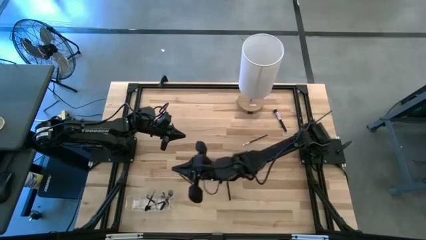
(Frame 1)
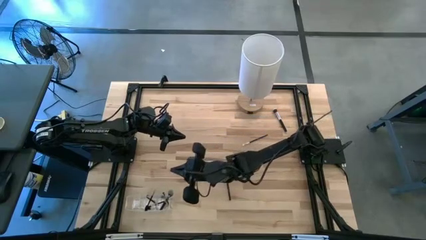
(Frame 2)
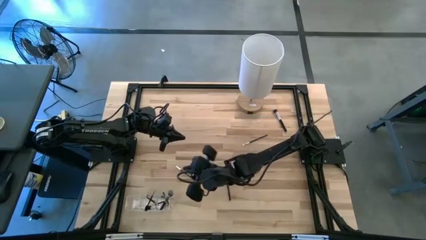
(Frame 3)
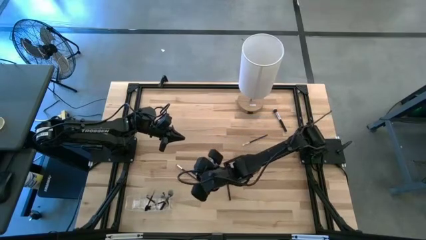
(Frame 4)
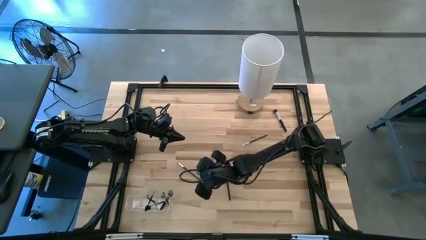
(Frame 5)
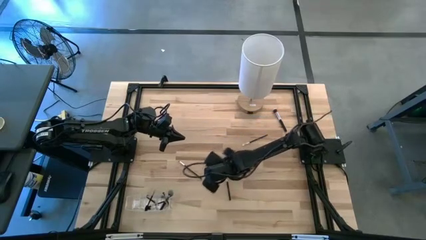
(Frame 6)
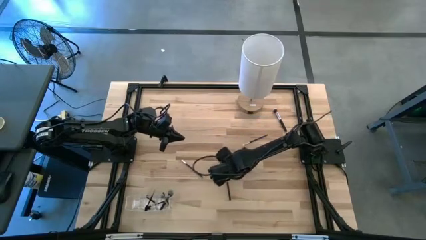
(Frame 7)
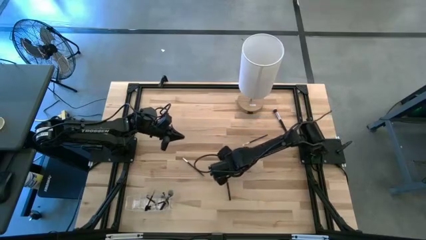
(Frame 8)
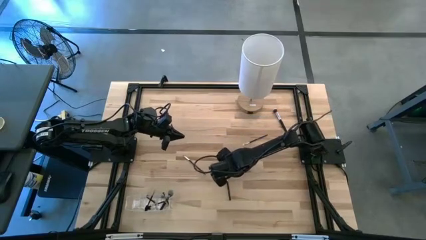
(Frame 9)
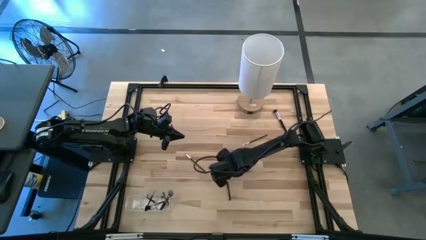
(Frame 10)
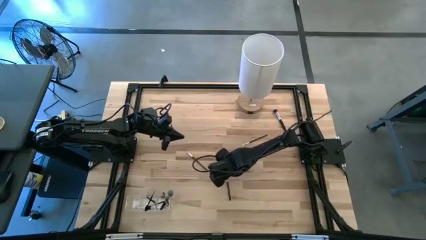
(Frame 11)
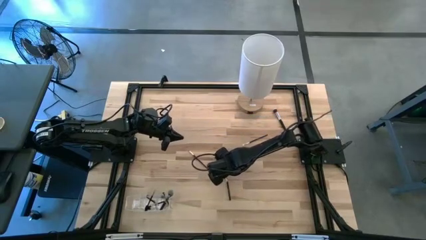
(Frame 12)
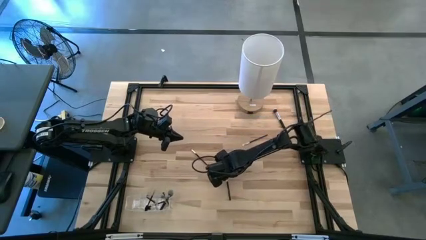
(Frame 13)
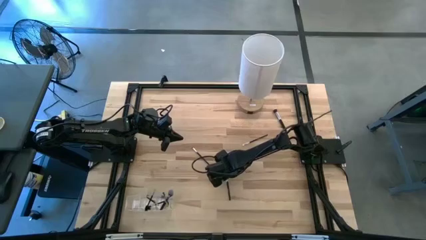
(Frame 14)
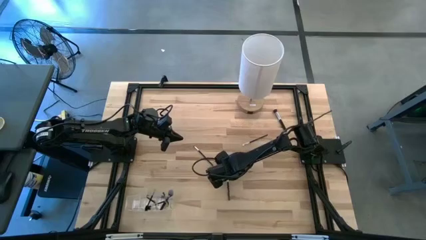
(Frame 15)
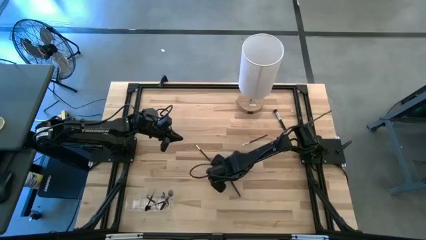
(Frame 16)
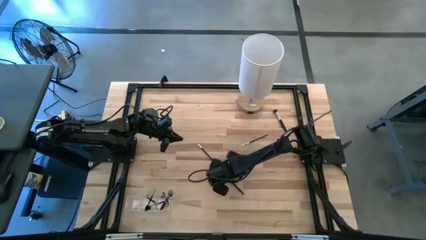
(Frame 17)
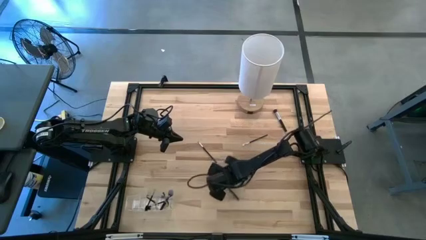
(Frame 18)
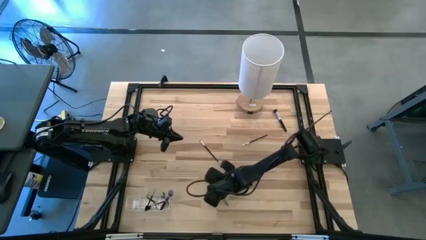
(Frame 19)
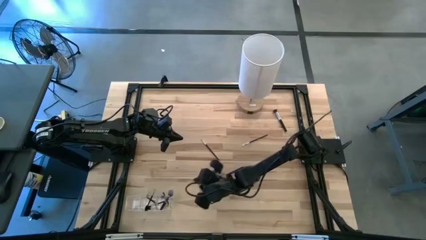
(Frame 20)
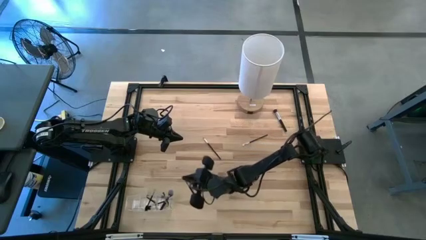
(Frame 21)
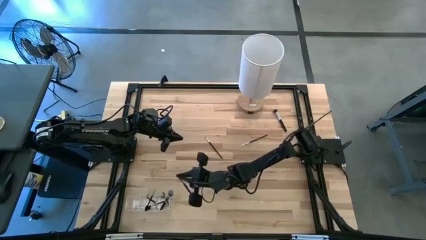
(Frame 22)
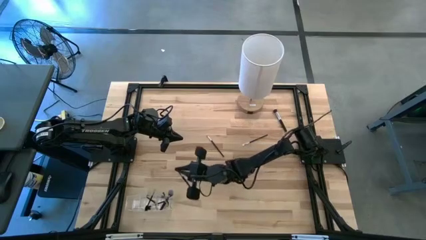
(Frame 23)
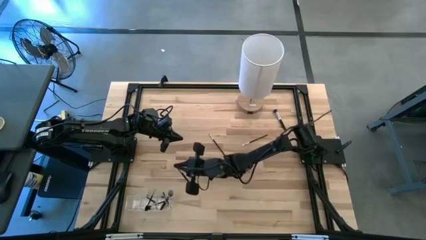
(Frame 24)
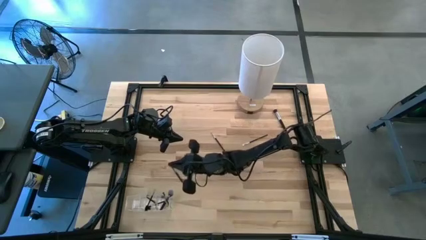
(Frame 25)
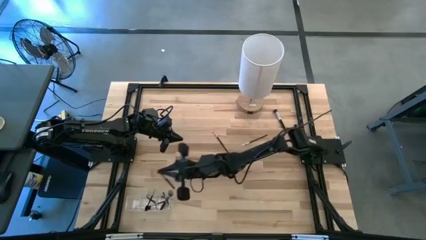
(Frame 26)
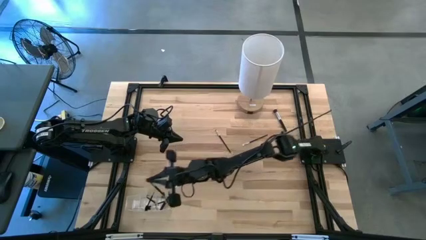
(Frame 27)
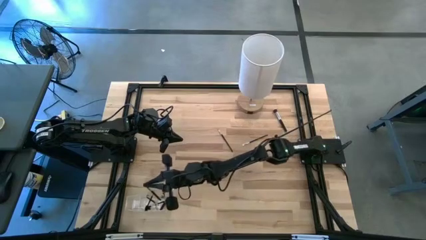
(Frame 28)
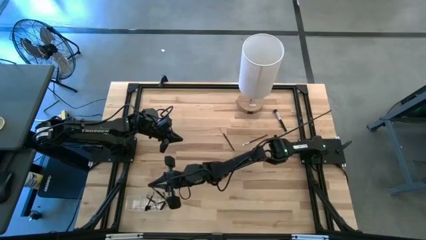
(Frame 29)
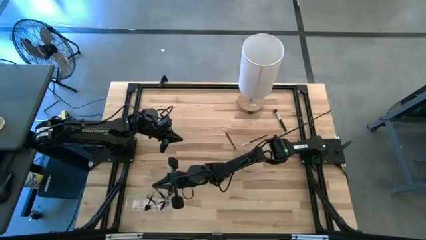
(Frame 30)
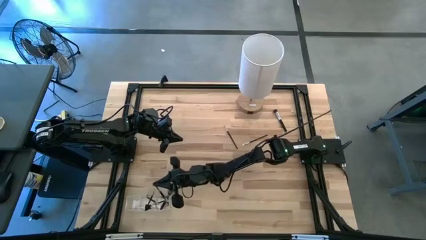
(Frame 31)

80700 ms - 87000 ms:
Task: Put items in baskets/containers
Put the eyeshadow brush into the transparent organizer

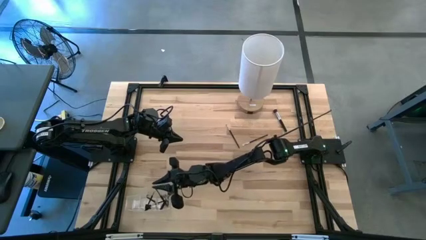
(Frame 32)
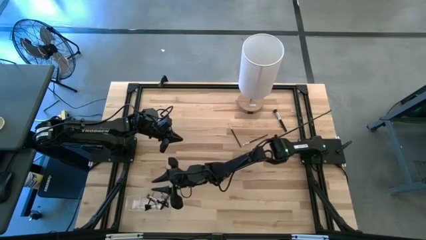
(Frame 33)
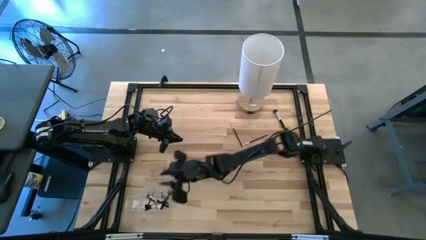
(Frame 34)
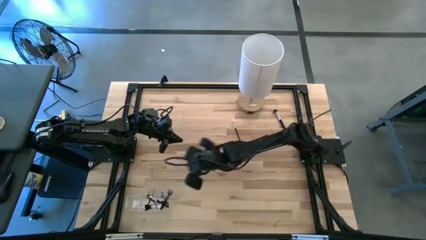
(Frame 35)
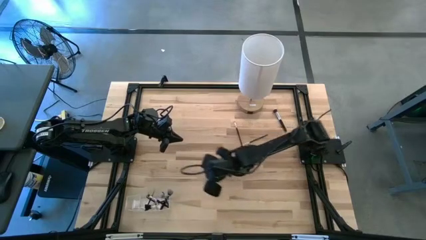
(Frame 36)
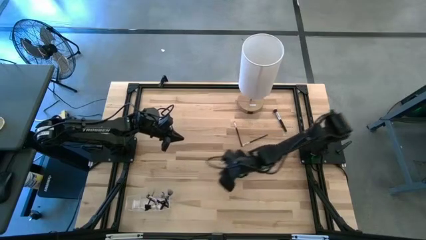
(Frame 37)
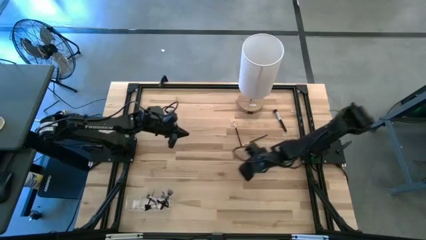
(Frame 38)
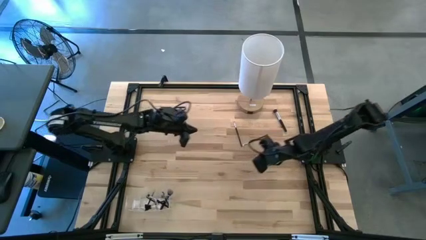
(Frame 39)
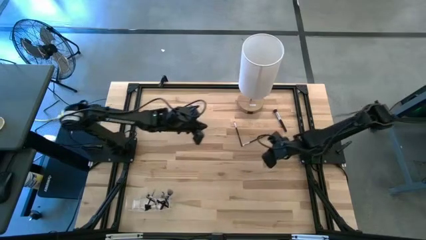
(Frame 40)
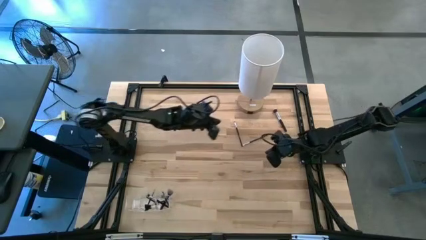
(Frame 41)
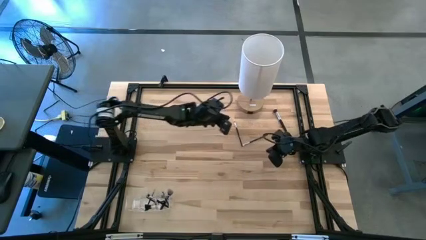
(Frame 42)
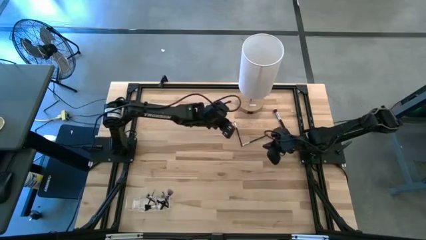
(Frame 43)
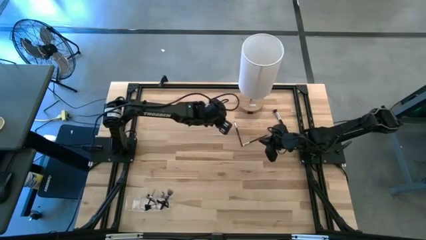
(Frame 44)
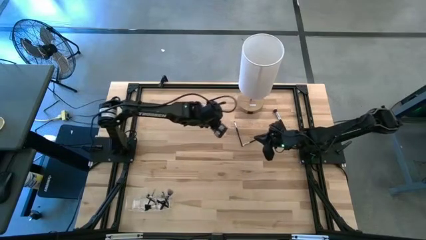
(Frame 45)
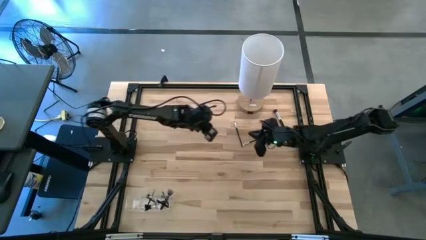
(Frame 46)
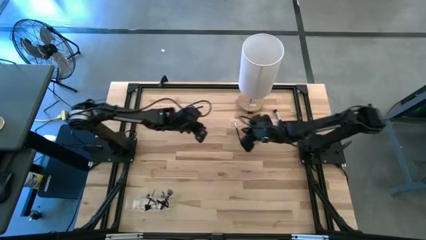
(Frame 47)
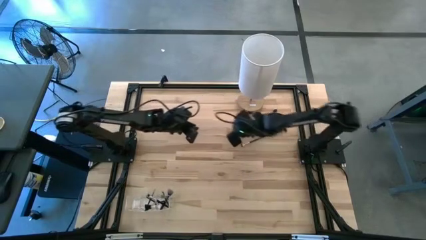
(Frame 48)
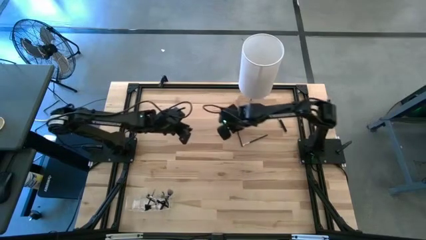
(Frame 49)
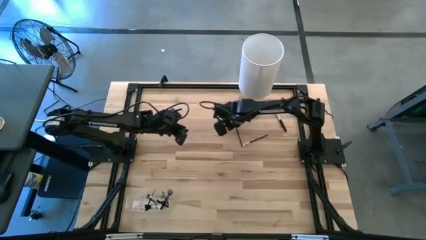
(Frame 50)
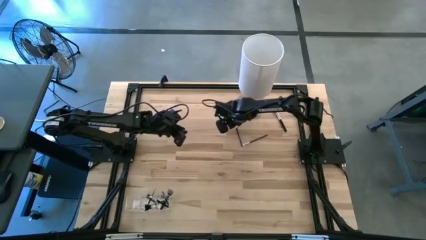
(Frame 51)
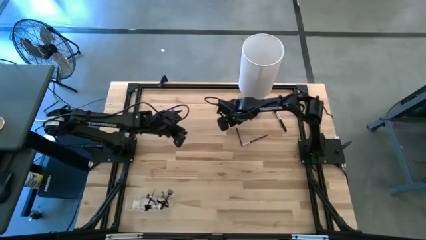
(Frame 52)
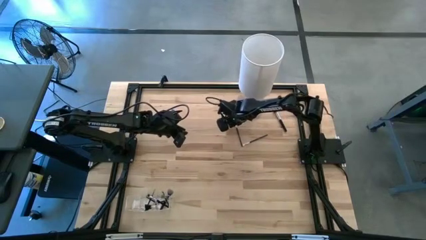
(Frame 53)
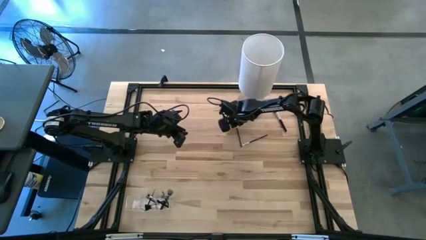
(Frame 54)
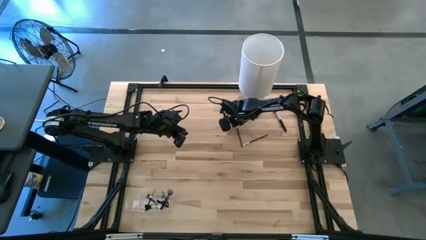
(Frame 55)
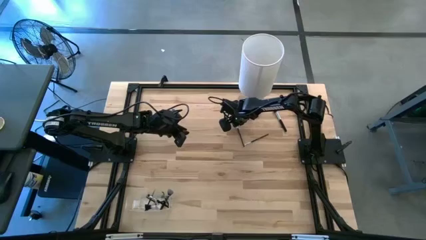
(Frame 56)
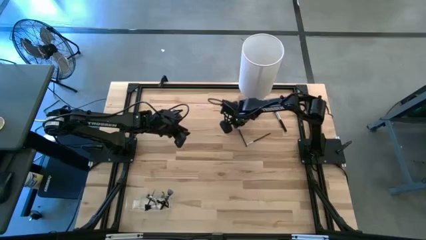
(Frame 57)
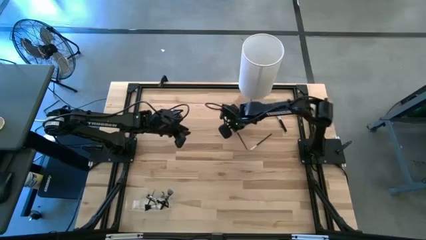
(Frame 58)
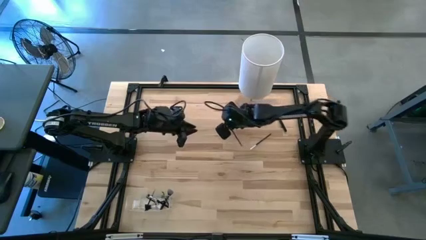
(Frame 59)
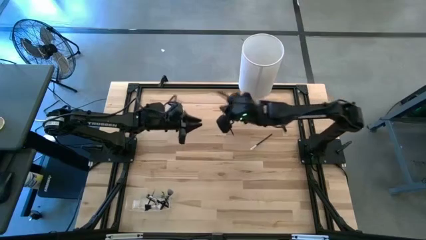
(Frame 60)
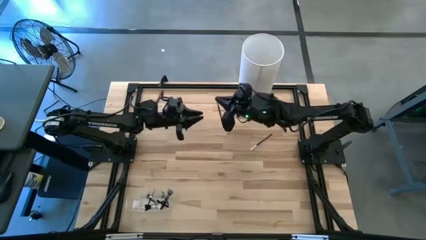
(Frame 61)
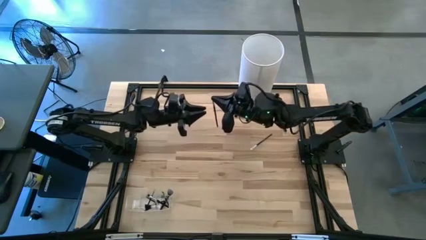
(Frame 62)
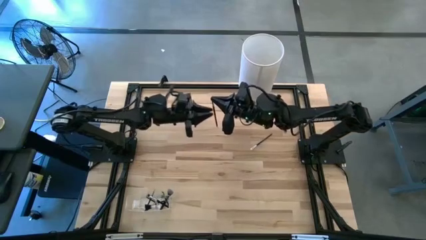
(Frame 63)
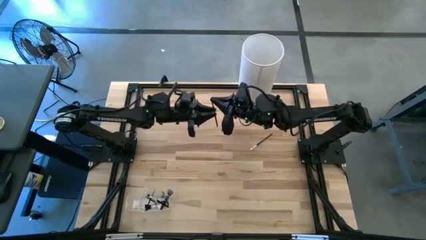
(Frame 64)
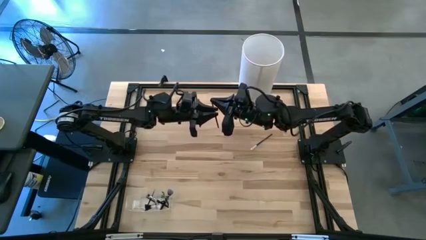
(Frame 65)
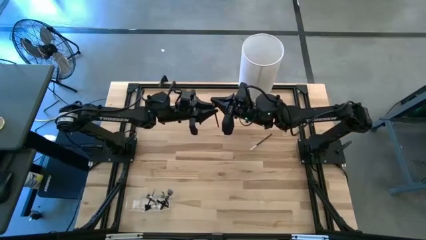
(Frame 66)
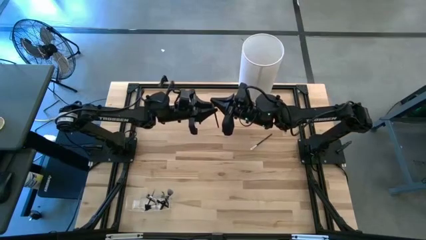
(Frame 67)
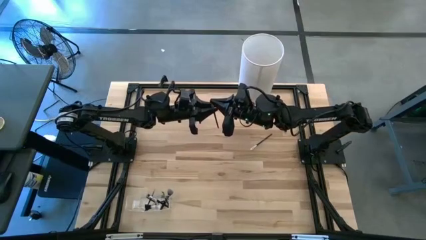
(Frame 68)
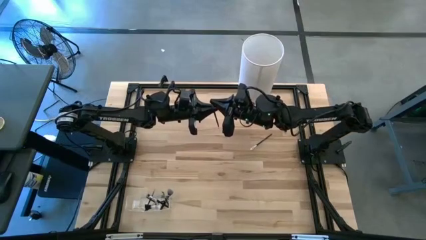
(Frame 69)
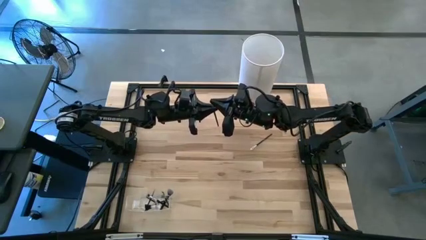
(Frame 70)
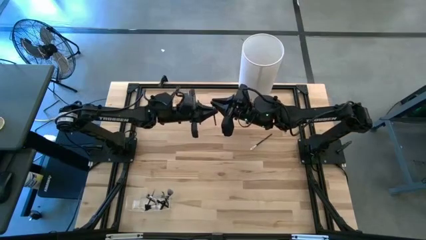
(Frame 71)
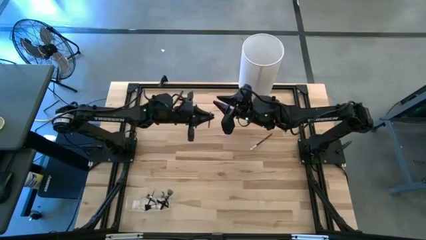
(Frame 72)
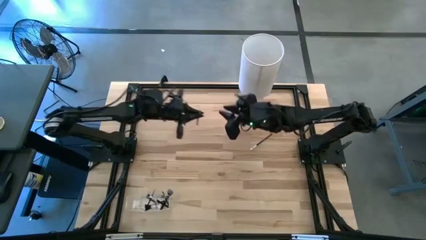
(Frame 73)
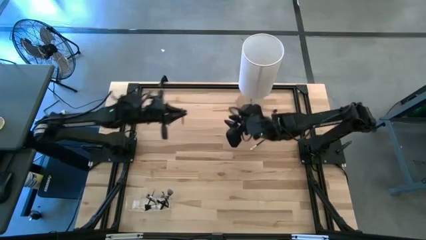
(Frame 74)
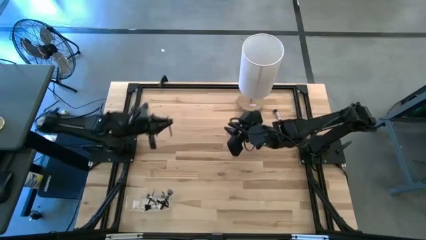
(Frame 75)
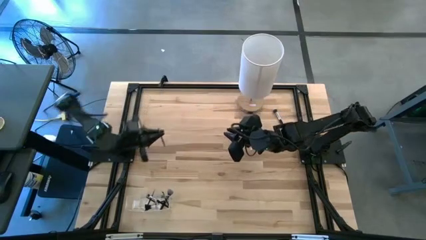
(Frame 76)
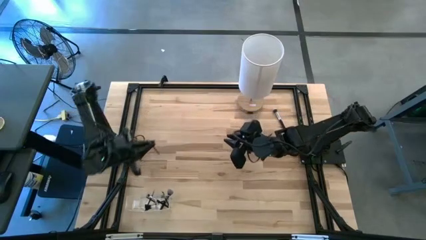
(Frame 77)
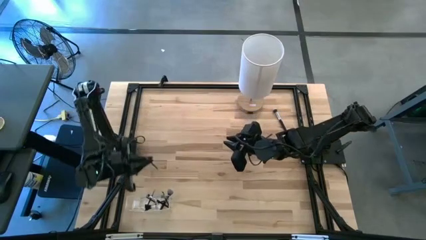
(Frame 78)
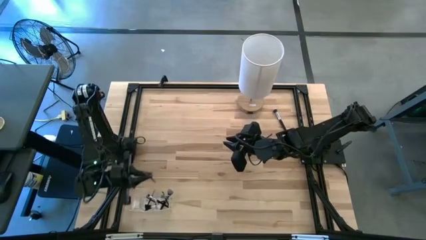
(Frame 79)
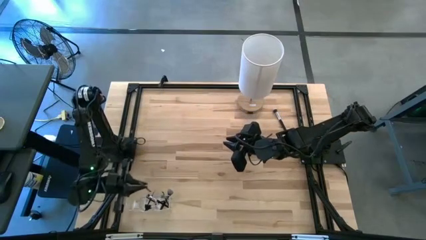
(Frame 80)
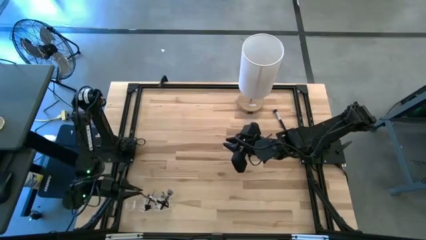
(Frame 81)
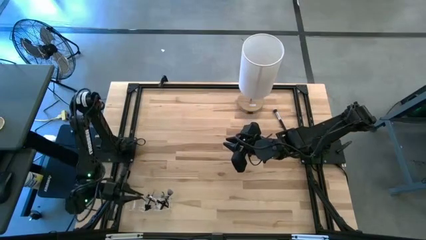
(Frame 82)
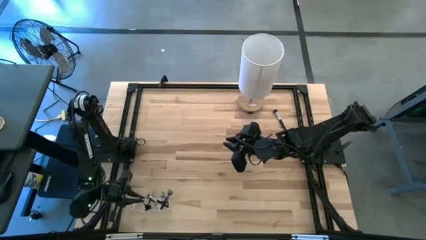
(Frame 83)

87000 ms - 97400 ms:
Put the eyeshadow brush into the transparent organizer
